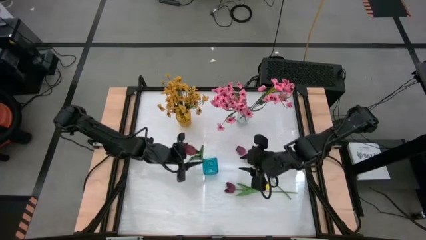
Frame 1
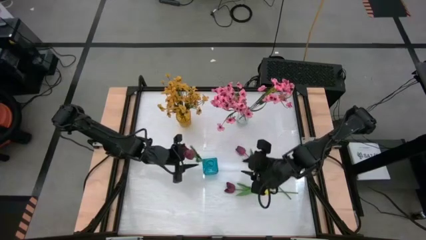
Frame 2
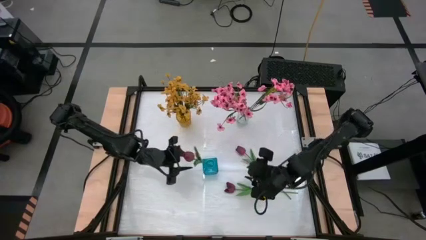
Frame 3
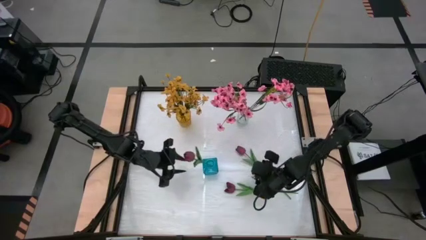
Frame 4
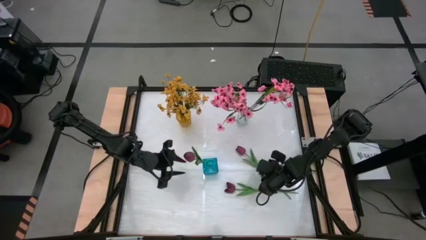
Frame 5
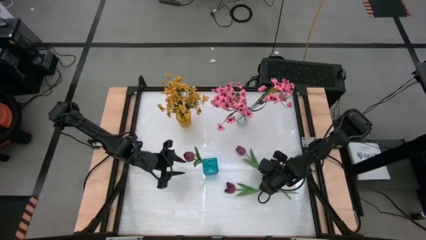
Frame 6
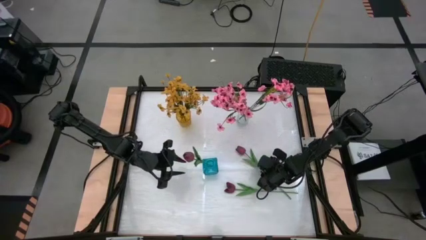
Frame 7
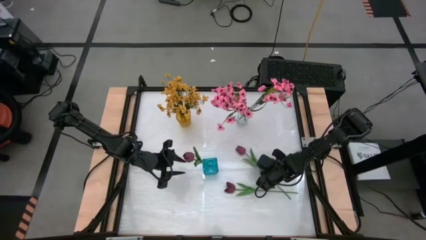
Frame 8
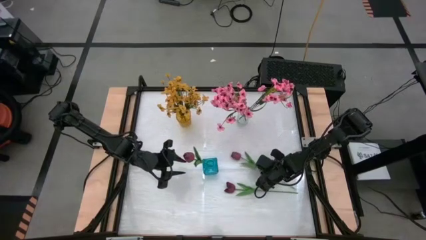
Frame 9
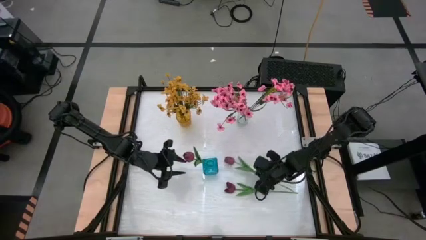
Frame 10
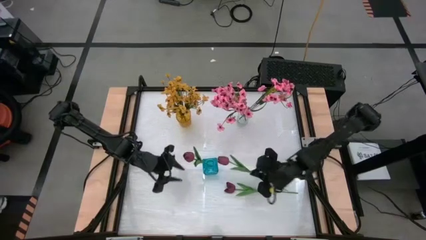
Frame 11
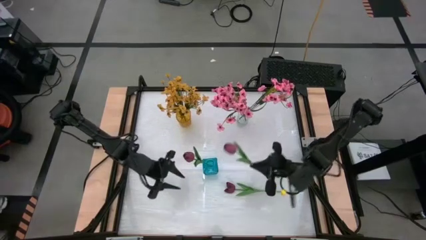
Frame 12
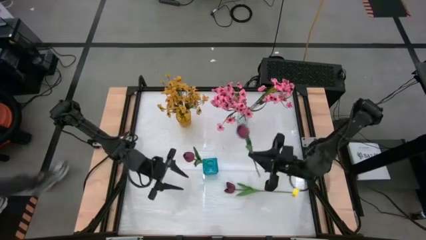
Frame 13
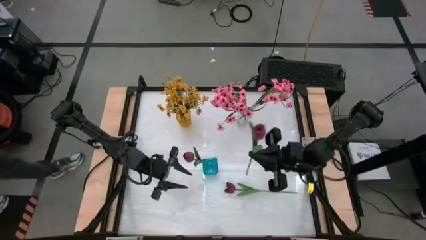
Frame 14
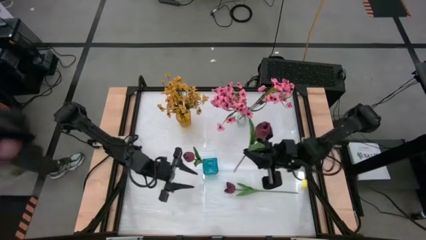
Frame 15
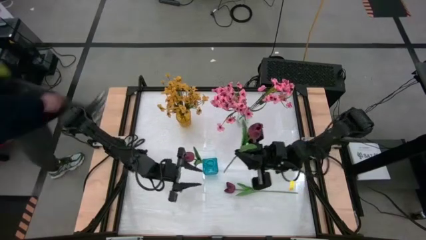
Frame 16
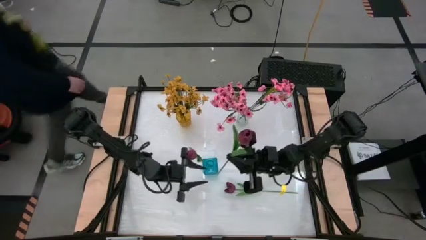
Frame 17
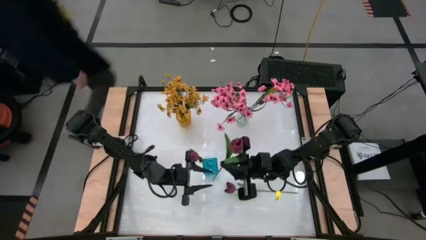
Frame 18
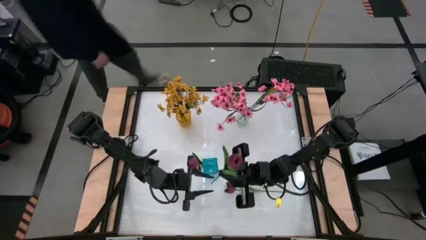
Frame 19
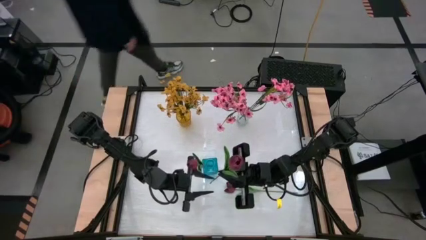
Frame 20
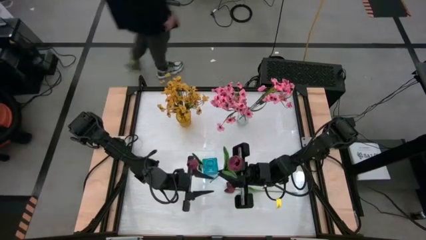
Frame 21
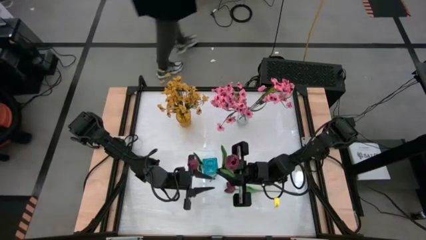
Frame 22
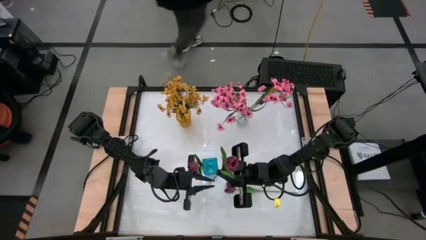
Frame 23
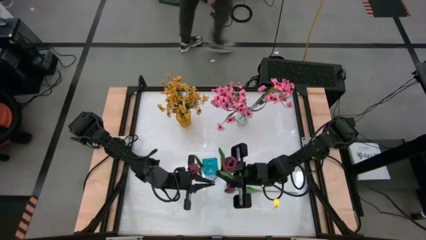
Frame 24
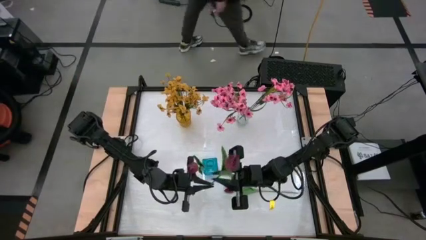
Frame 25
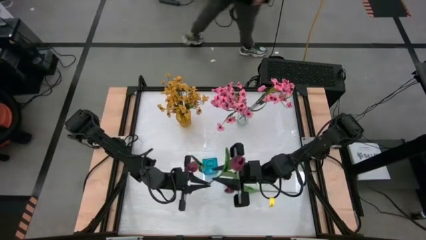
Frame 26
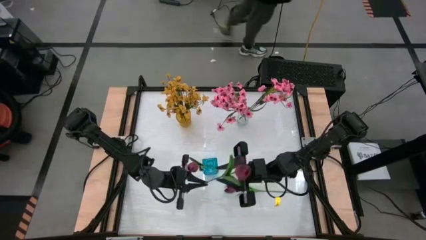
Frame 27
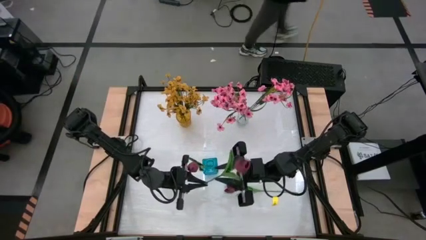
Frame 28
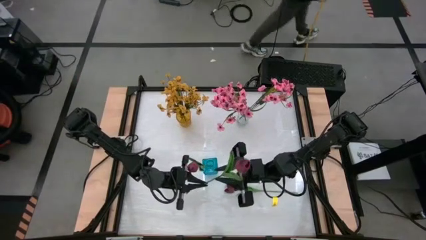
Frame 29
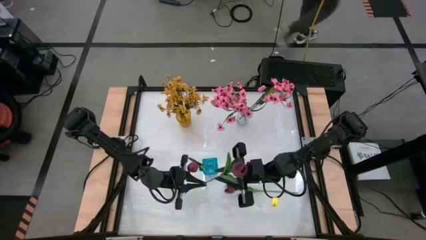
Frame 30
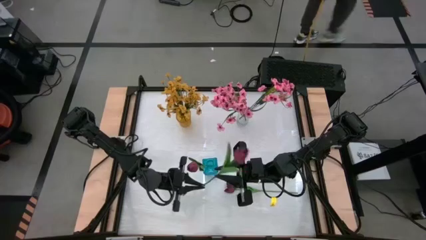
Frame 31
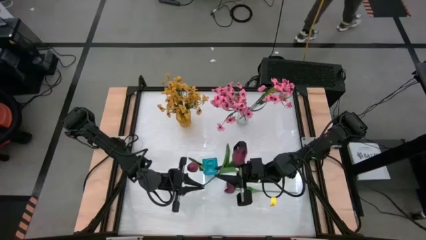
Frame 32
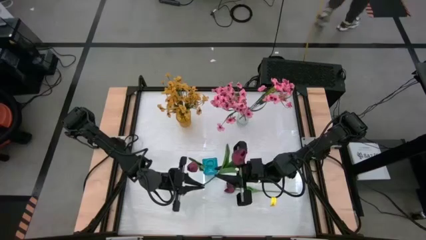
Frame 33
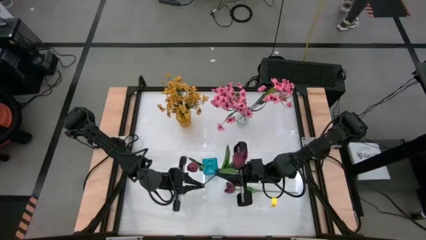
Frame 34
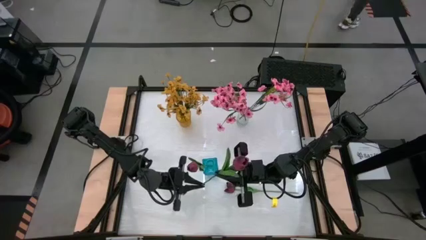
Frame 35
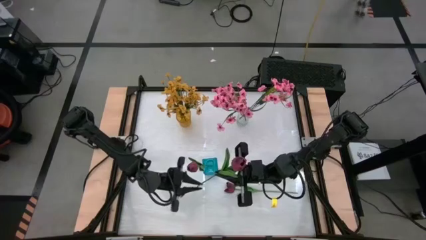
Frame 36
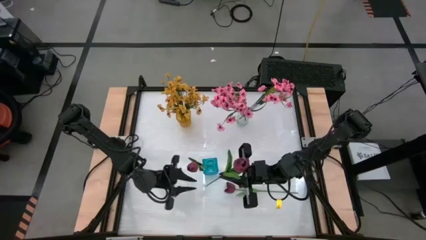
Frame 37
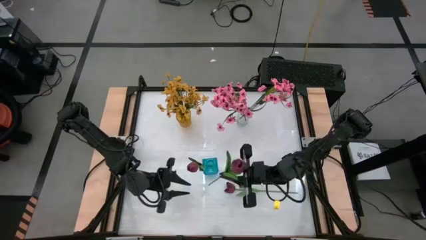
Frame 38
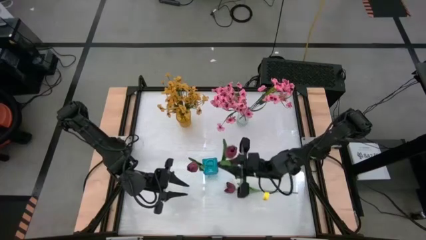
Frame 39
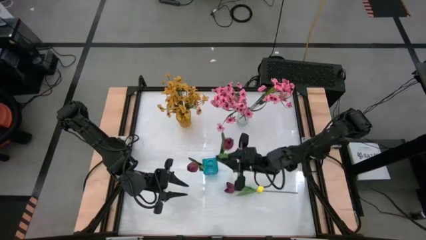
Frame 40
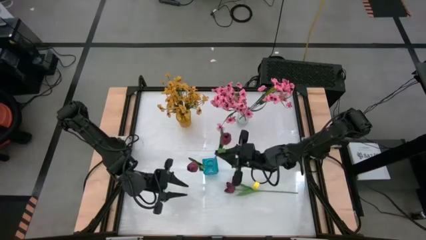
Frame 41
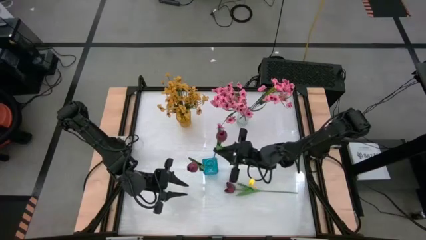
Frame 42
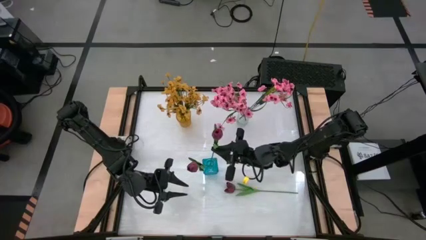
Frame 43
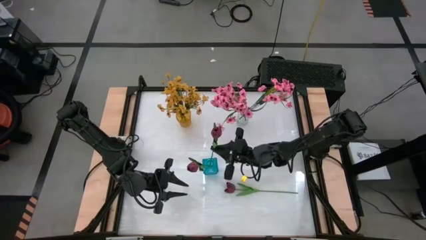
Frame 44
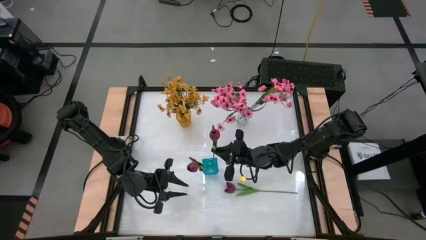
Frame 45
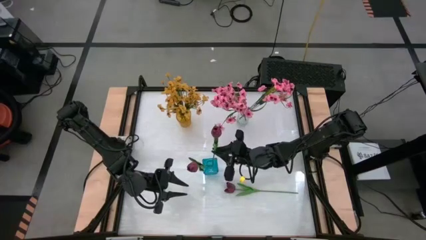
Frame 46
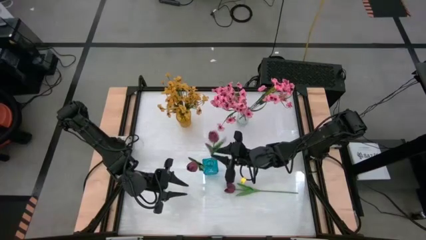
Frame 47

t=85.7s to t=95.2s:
Task: Sort flowers into vase by color
Put the top dark red flower into the blue vase

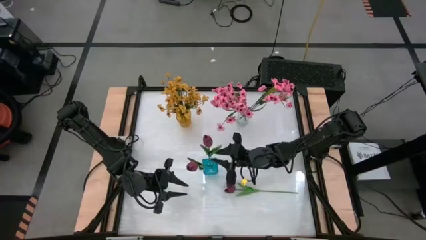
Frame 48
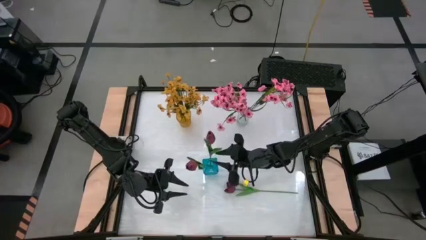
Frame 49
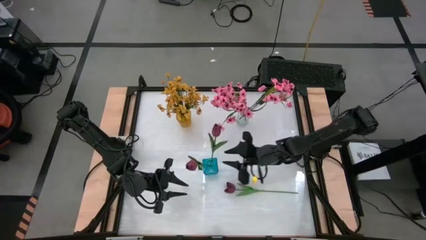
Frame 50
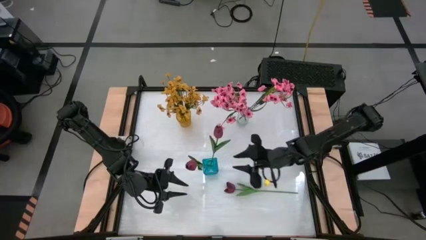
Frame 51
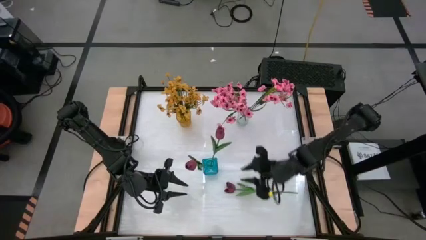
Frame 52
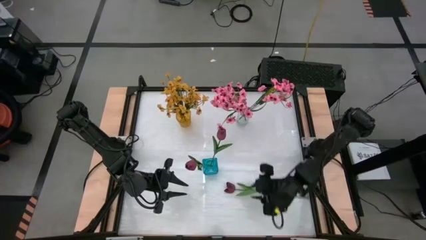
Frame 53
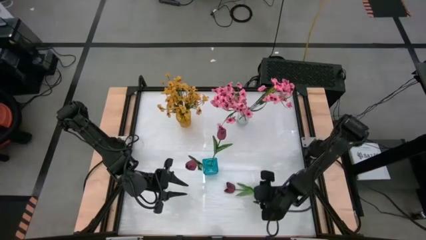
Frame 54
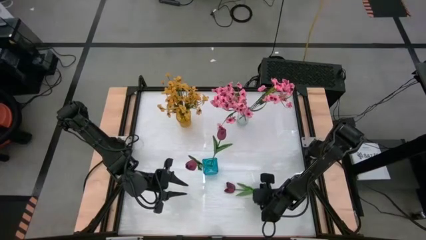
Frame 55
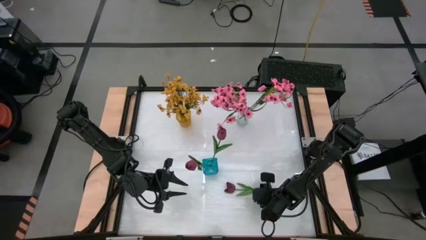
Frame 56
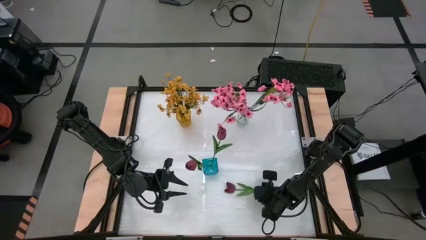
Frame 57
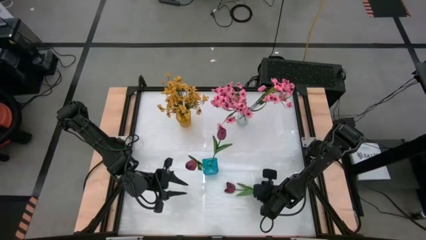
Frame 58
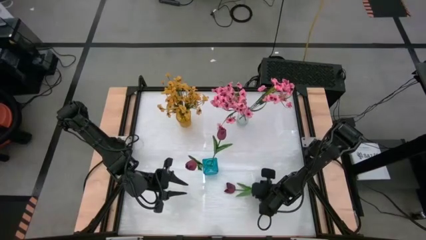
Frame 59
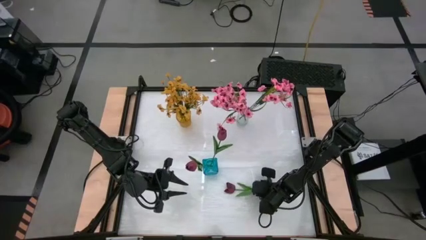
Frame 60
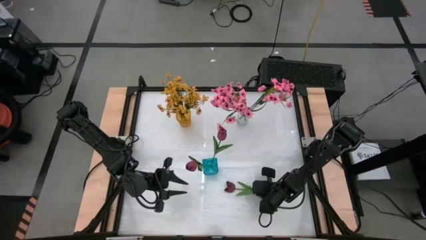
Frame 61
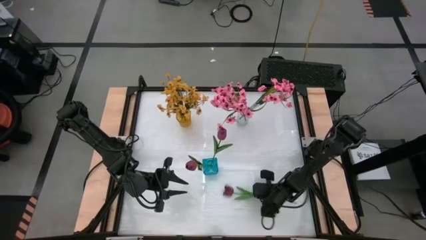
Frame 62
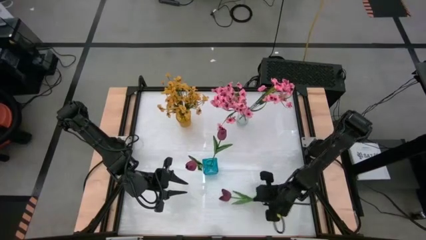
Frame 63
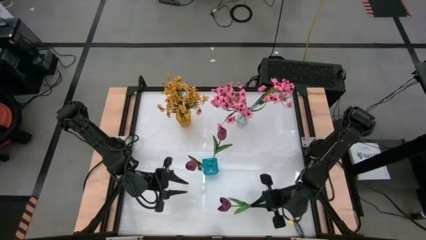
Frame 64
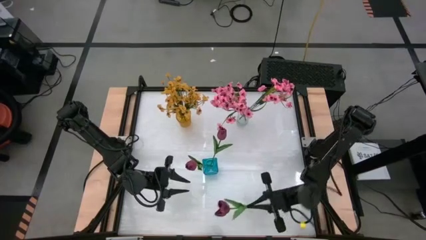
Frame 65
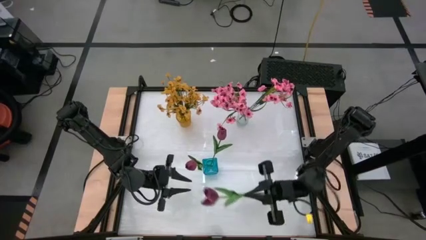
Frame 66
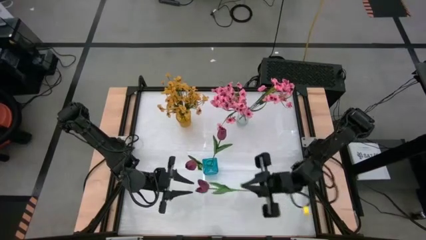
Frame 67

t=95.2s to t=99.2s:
Put the dark red flower into the blue vase

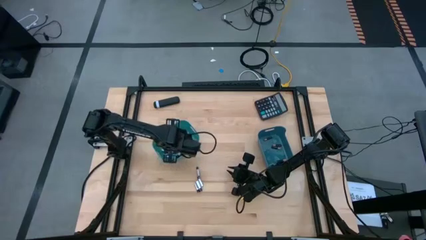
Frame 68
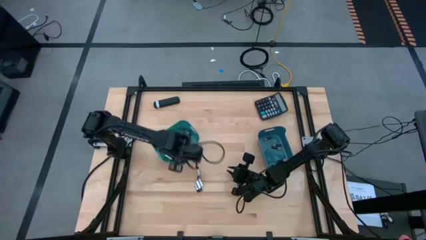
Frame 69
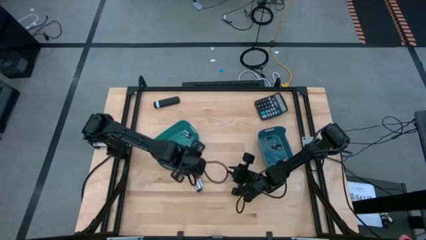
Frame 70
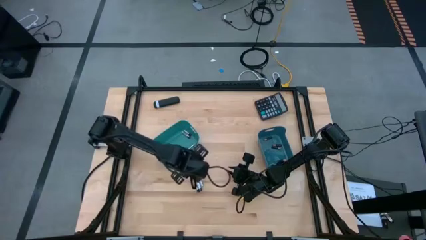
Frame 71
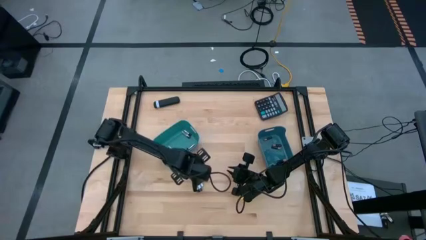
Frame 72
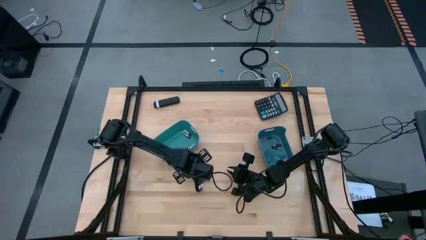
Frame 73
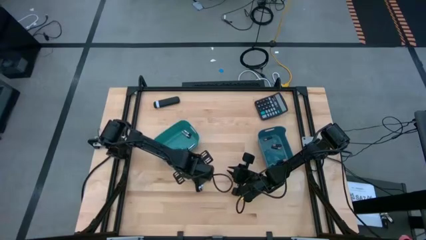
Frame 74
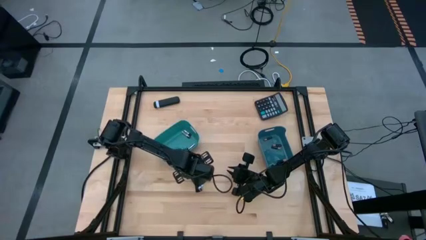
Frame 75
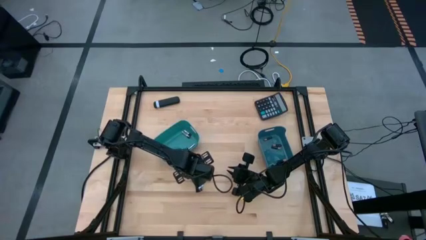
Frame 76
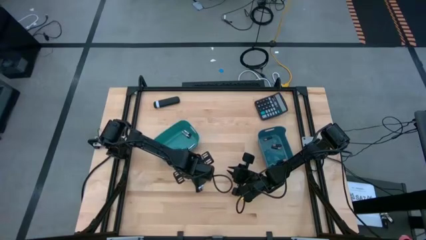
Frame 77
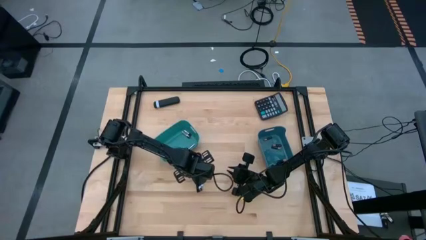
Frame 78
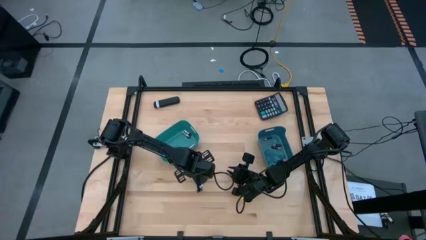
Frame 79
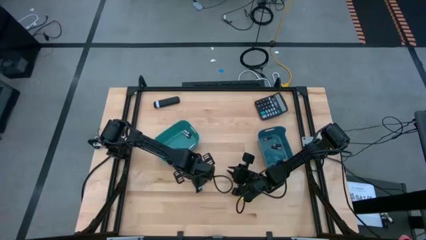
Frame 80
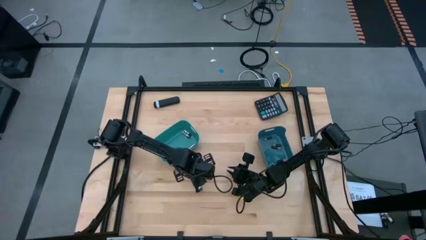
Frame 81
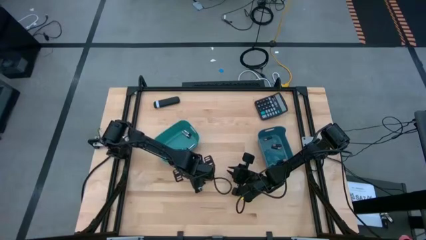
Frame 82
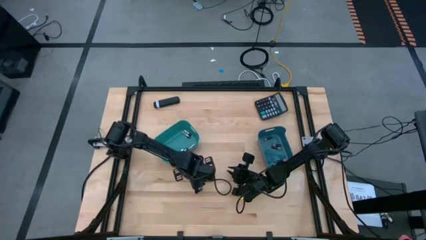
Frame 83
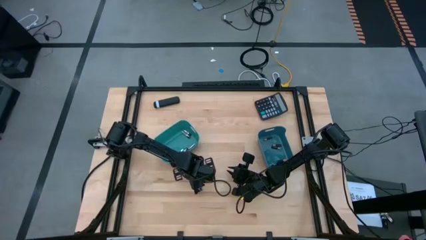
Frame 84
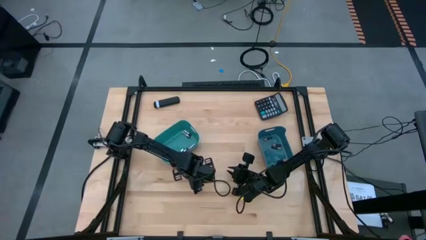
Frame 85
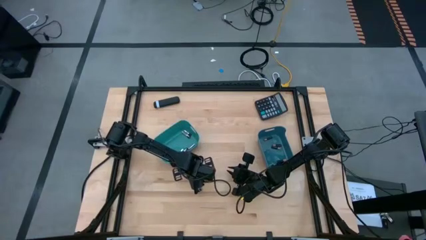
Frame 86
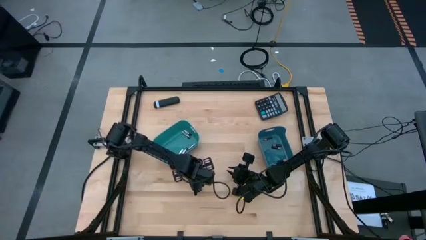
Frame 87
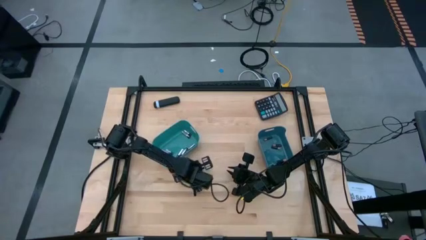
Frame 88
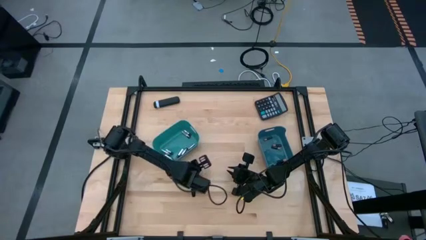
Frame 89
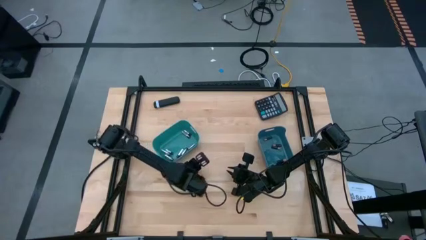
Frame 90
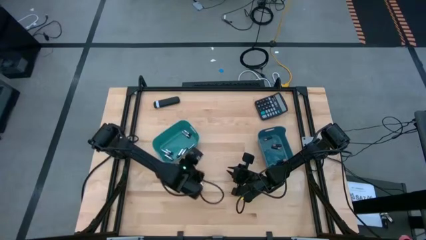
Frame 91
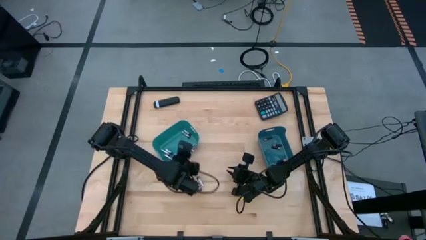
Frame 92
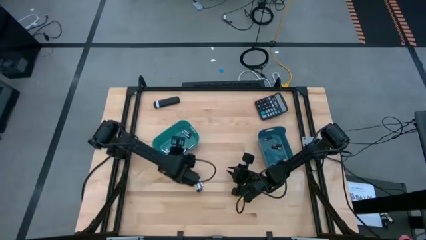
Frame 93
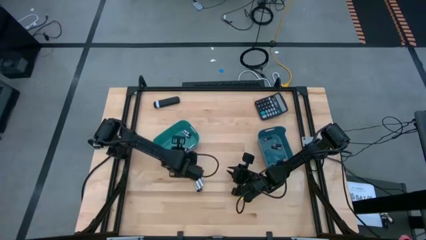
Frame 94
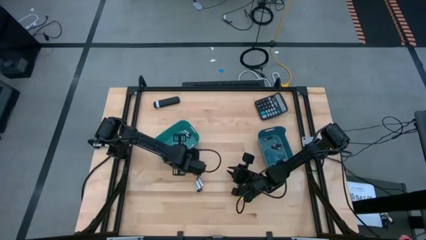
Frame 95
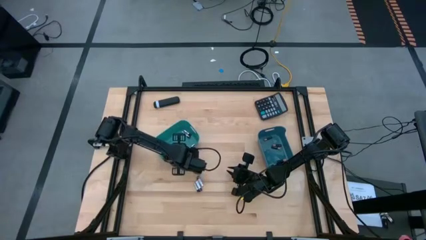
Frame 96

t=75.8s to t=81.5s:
Task: Sort batteries
Put the white battery into the green bin
